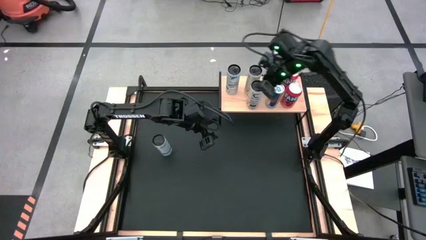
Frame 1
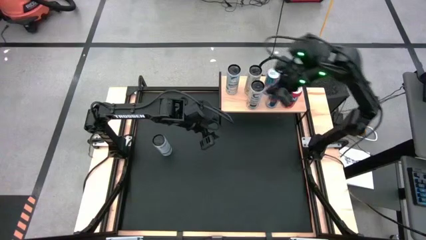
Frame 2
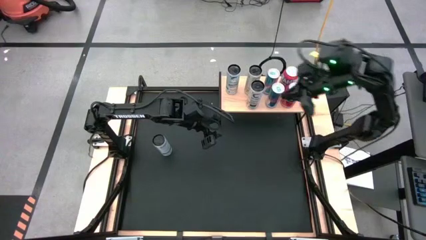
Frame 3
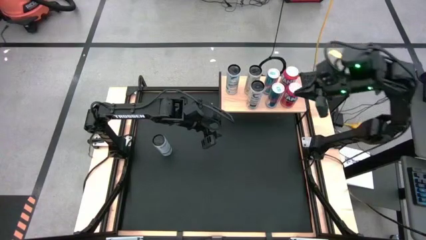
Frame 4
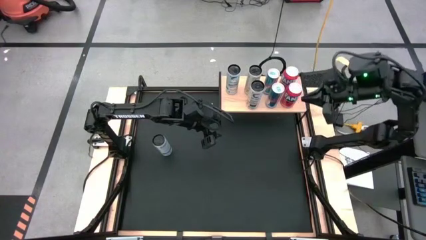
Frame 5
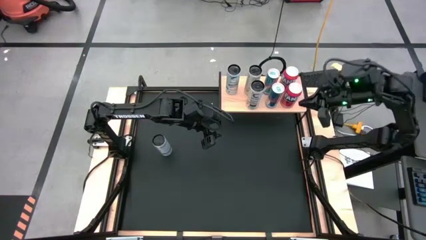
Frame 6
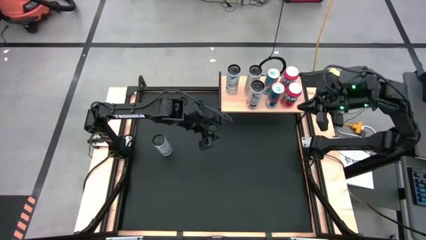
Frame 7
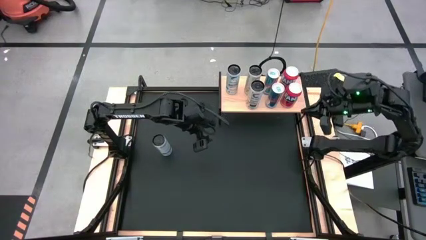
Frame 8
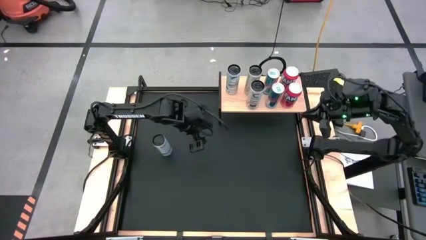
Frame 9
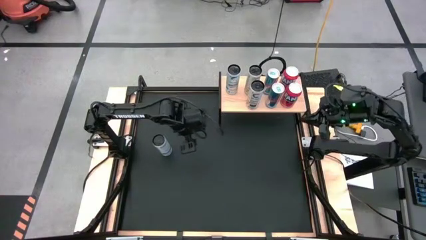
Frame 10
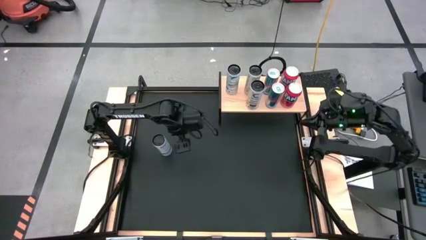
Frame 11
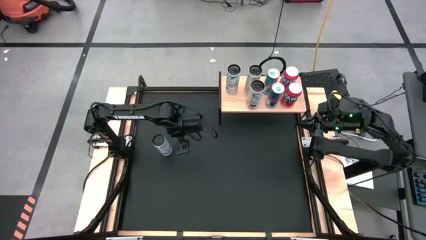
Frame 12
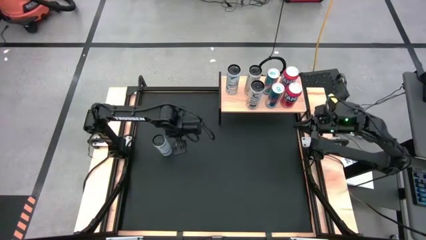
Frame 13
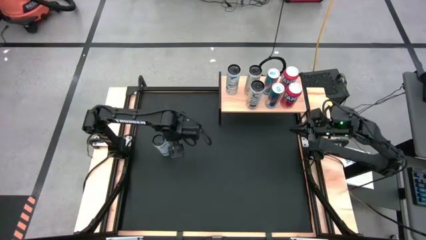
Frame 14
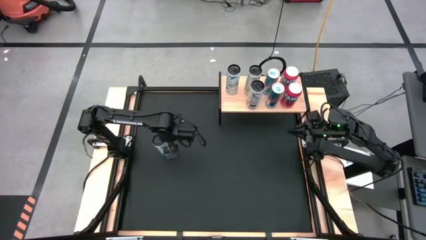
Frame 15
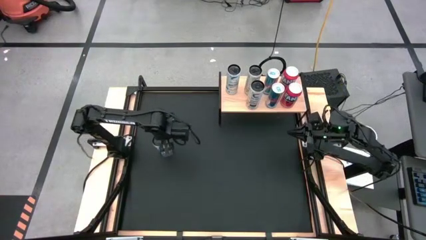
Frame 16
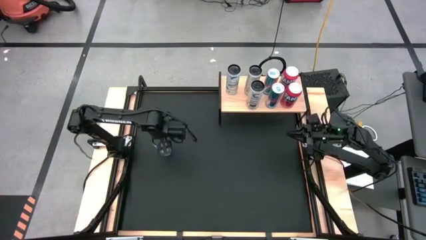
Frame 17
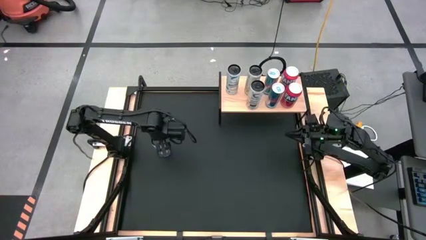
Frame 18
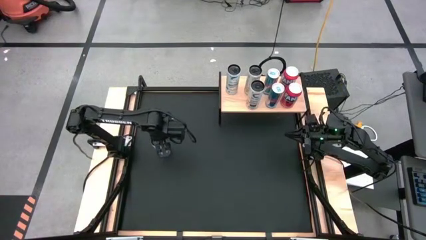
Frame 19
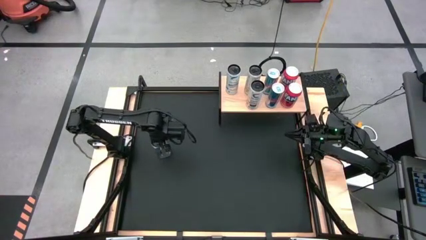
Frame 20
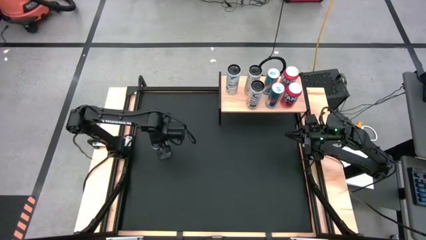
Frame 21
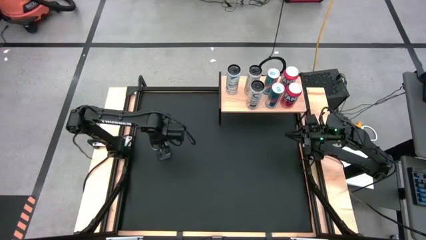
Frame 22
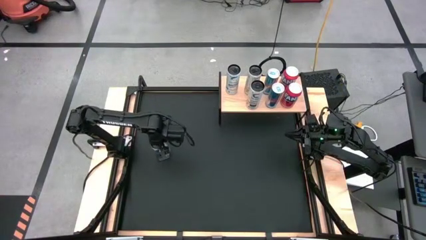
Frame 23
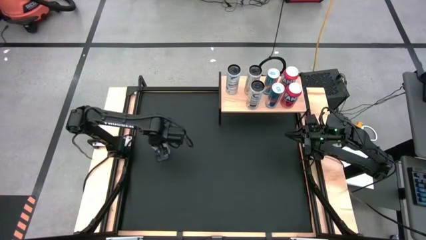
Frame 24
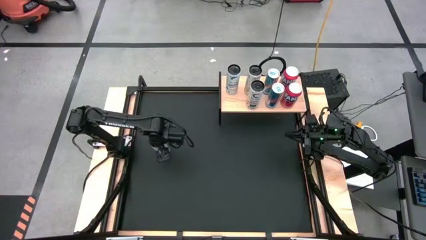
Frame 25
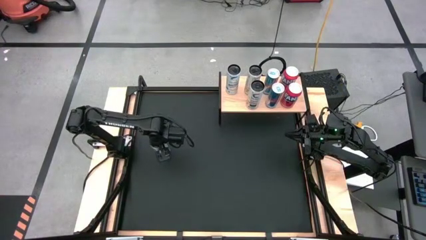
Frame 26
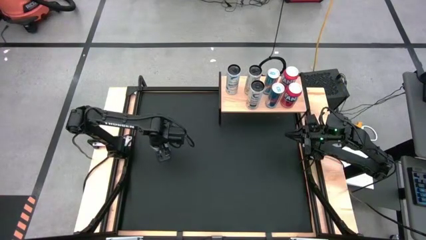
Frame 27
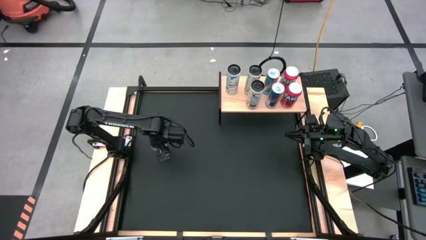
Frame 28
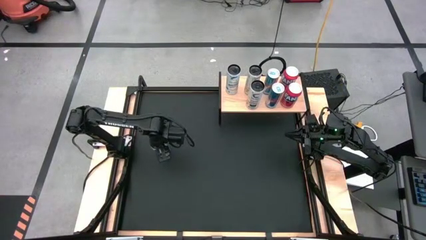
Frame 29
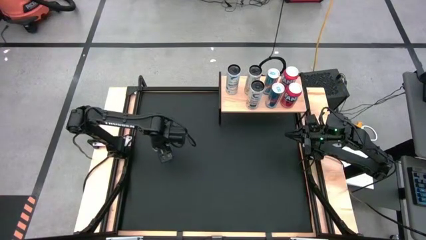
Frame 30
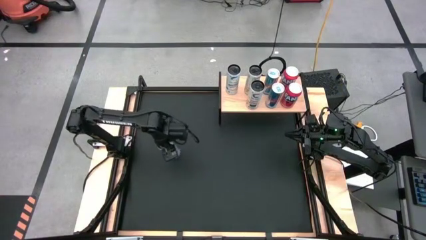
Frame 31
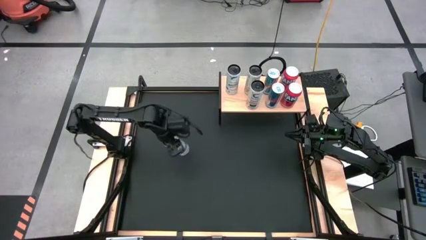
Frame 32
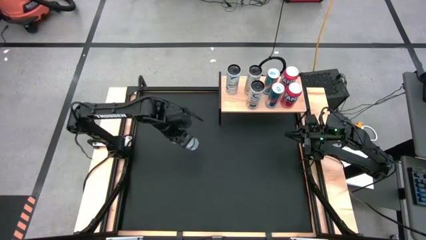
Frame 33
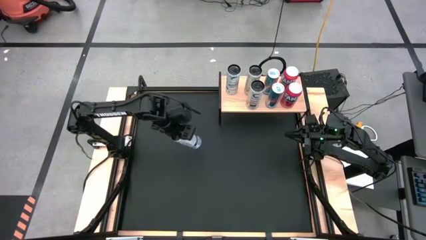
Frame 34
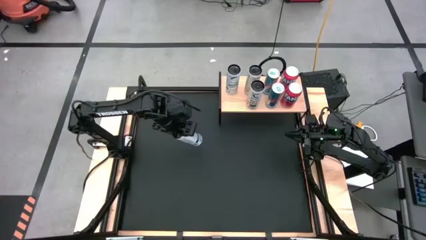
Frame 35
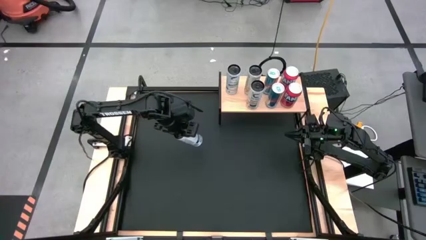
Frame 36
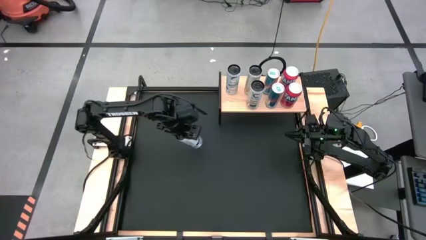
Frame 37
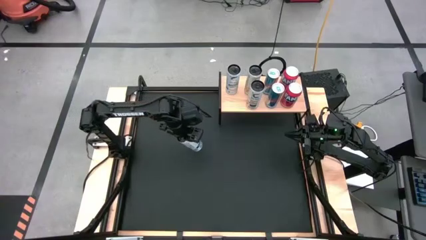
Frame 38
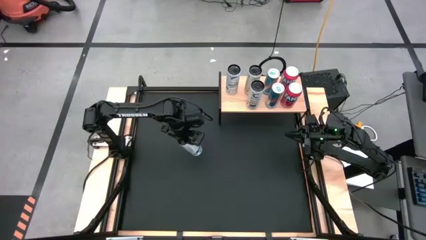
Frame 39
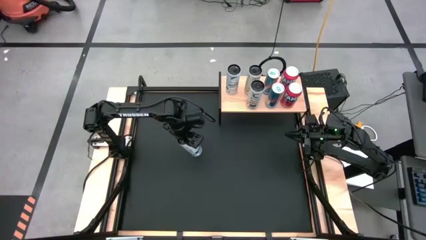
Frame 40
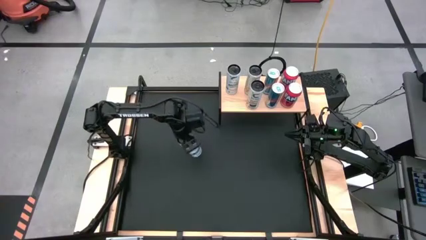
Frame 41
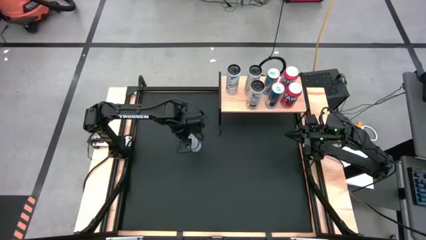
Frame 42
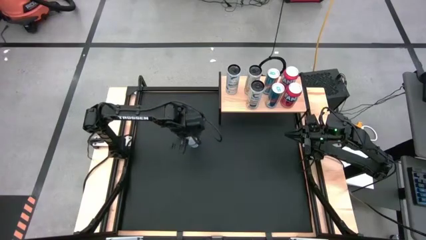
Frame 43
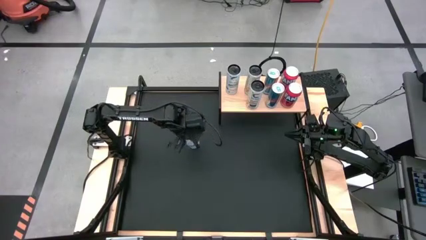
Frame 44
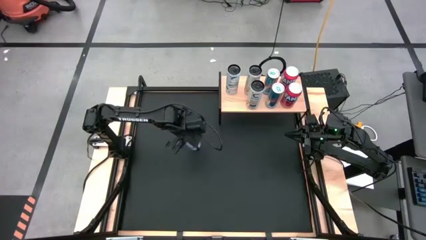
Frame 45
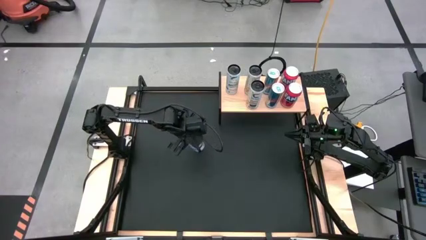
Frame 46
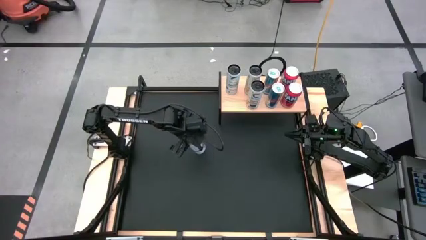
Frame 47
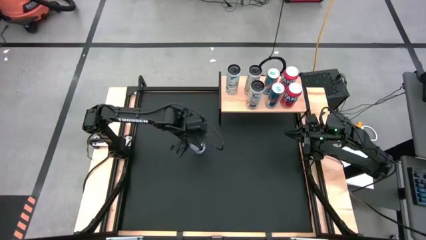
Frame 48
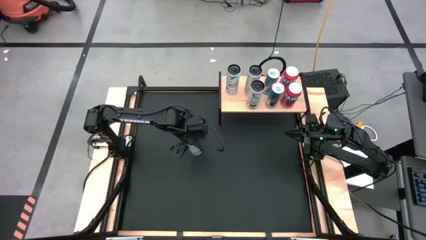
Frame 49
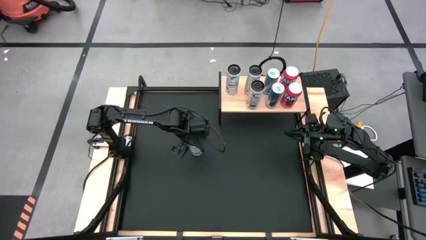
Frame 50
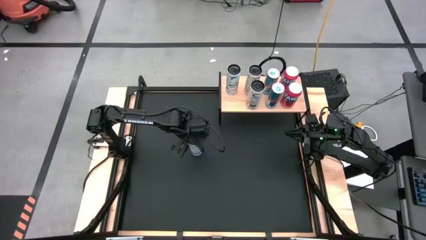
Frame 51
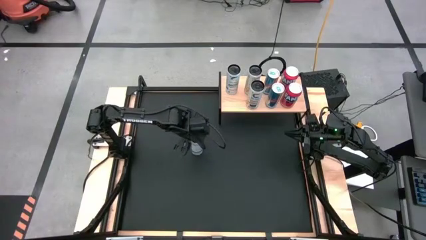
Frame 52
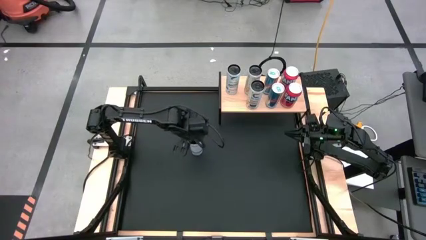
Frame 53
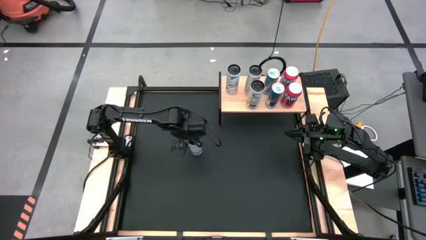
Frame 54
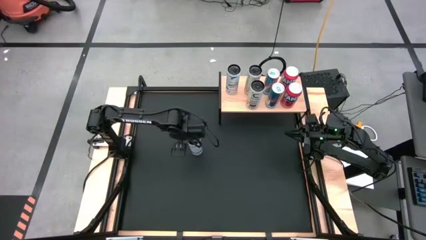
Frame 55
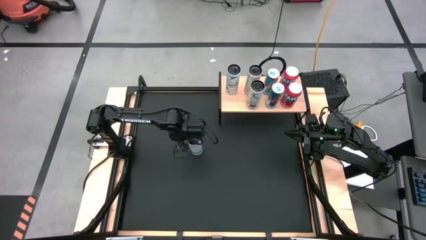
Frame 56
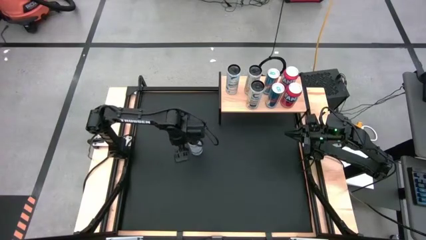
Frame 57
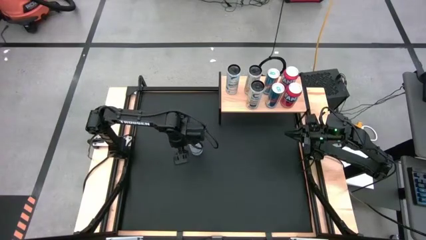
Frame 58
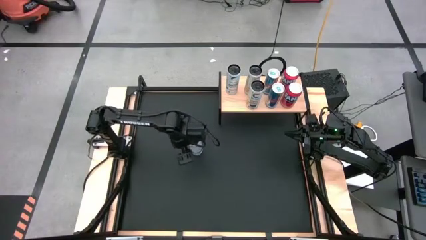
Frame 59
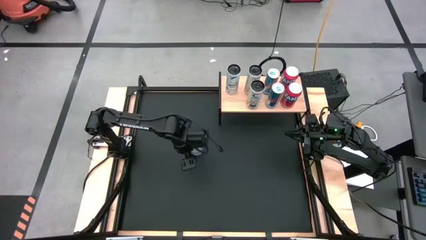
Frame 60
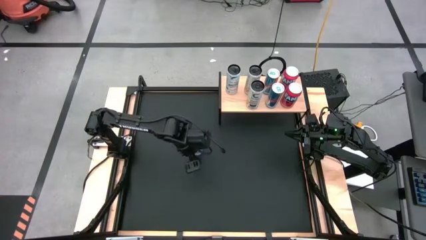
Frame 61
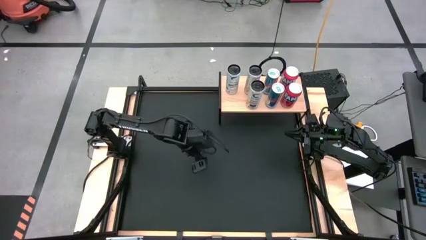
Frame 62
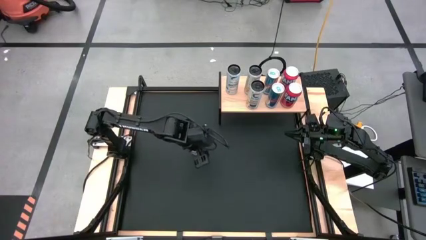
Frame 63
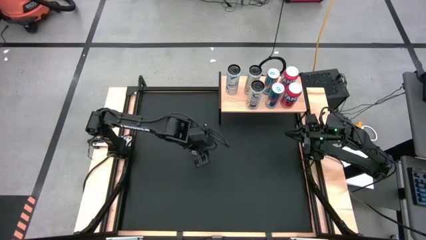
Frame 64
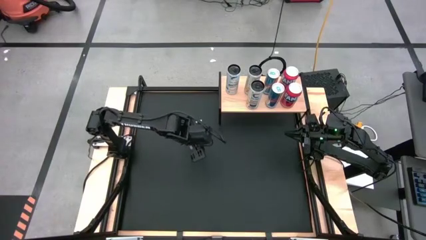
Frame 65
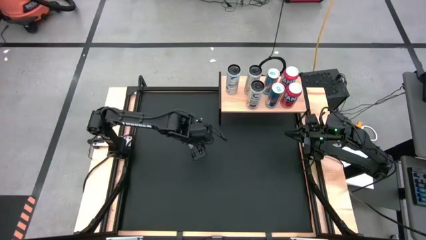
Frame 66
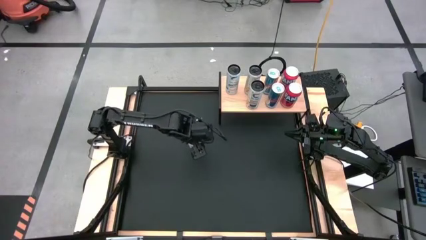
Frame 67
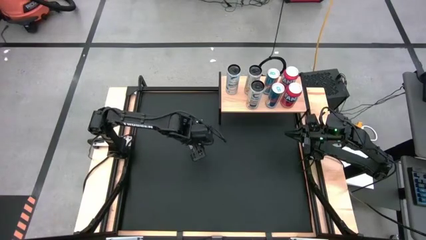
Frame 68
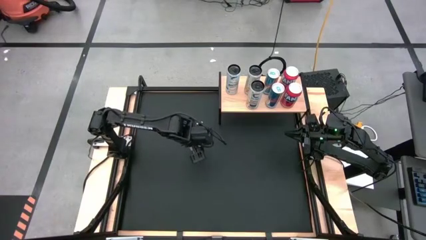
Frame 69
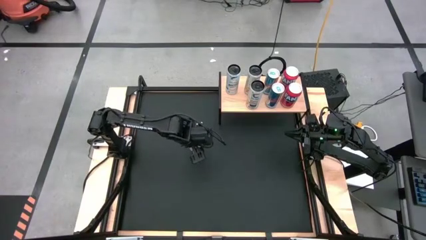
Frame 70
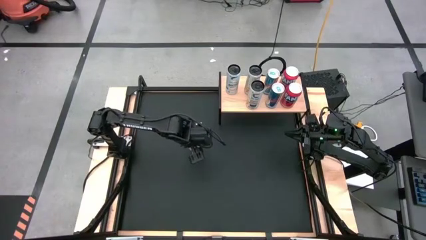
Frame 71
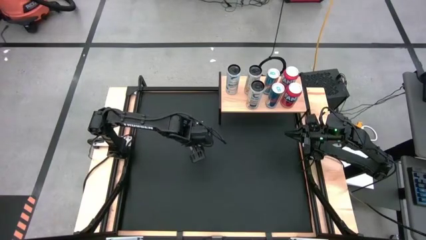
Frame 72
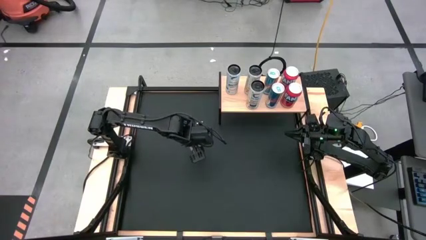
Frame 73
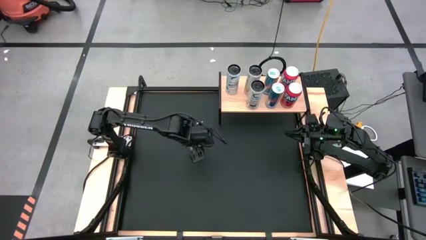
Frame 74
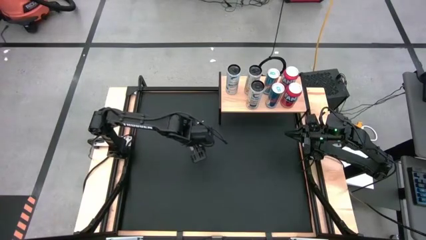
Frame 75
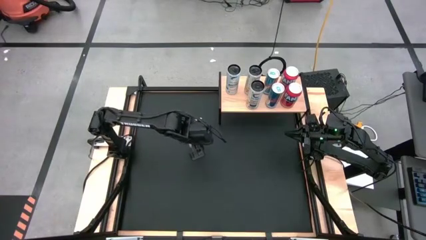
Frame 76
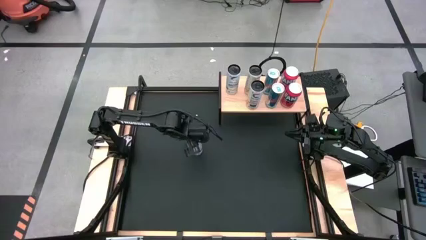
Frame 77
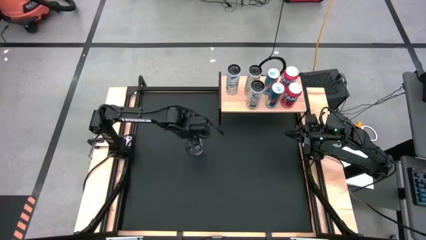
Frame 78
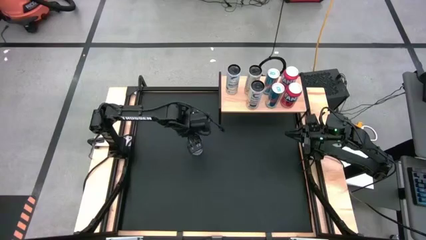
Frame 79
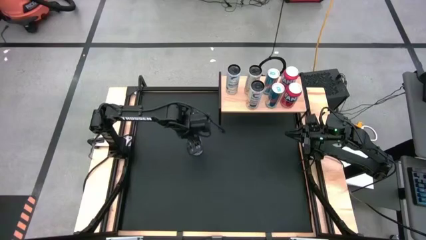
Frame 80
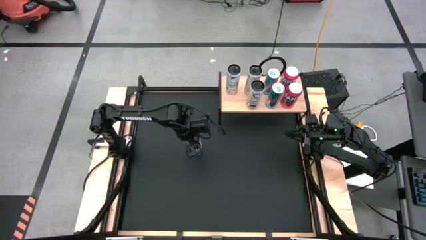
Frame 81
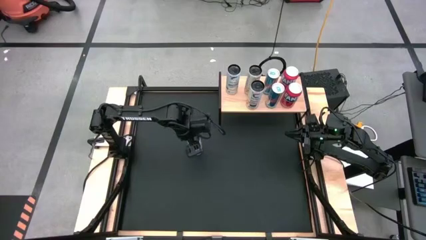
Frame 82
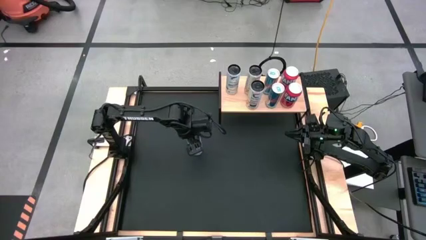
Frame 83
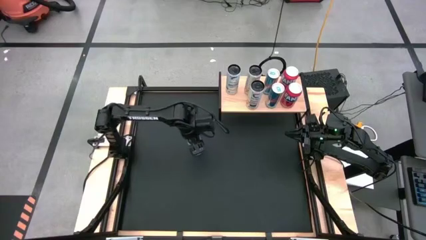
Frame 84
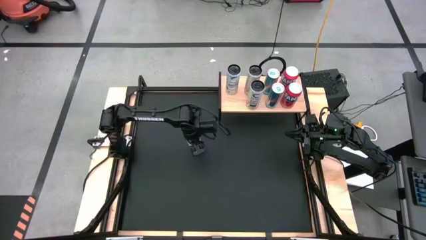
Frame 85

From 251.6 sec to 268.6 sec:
Task: Place canned beverage on shelf
Put the white blue soda can on the shelf aligned with the white blue soda can
